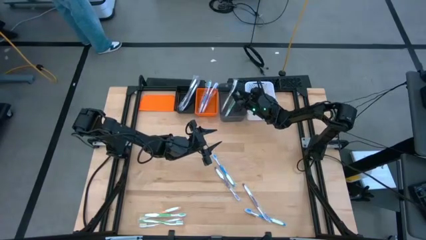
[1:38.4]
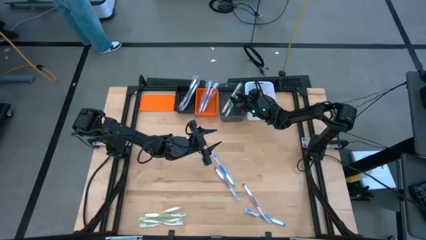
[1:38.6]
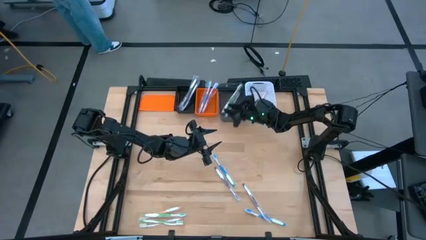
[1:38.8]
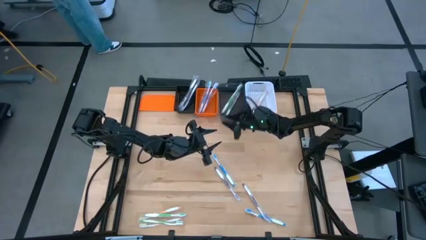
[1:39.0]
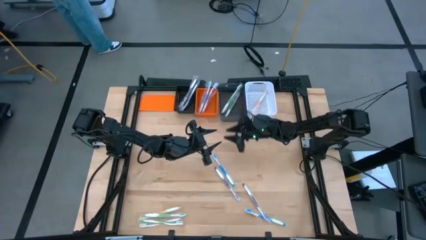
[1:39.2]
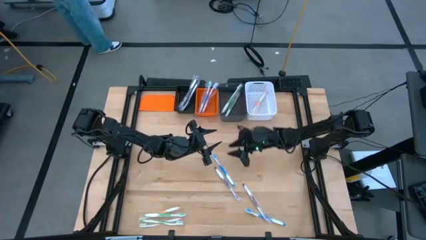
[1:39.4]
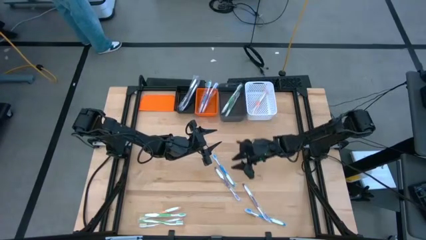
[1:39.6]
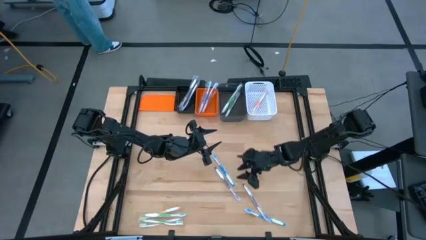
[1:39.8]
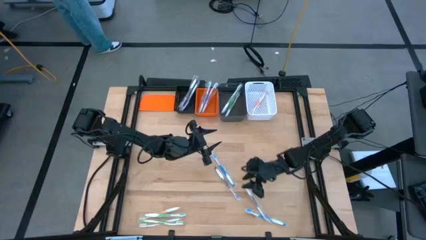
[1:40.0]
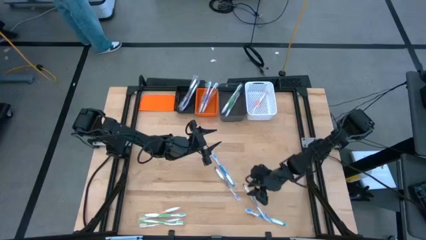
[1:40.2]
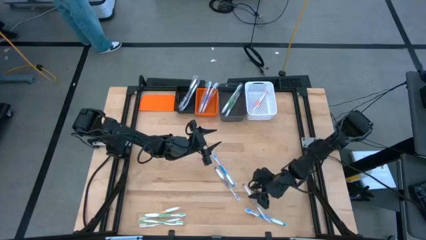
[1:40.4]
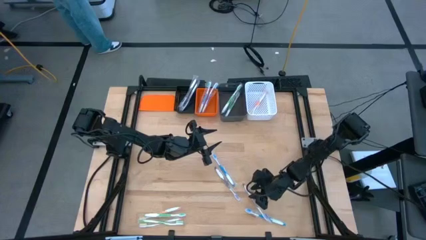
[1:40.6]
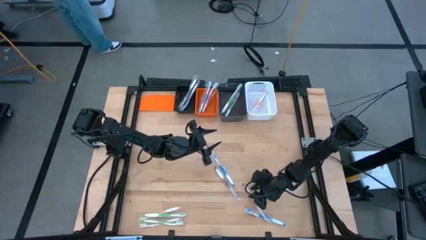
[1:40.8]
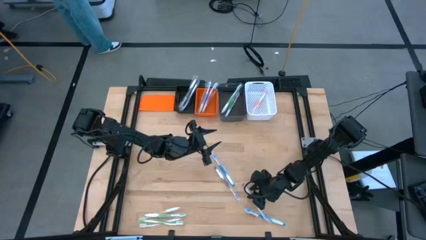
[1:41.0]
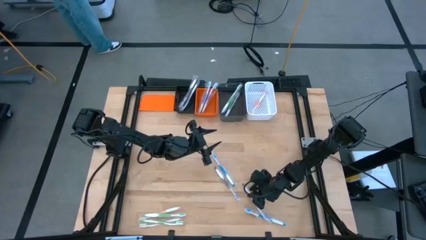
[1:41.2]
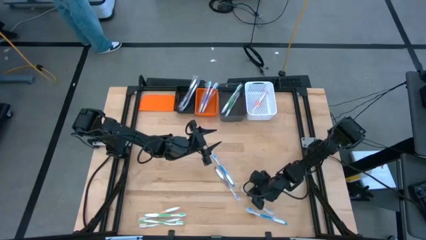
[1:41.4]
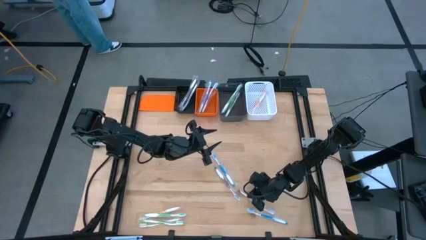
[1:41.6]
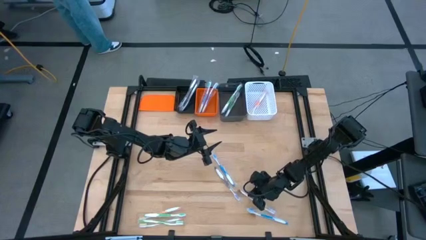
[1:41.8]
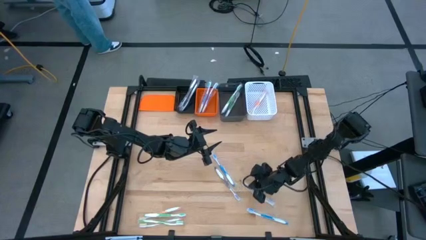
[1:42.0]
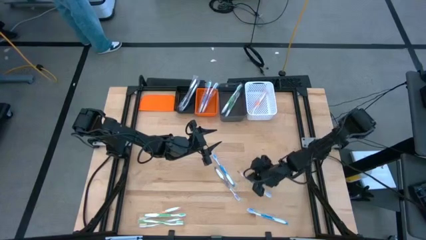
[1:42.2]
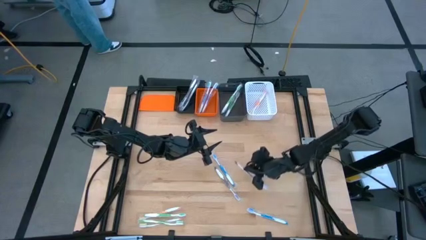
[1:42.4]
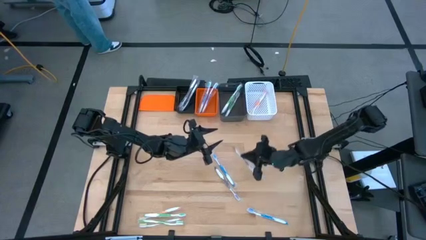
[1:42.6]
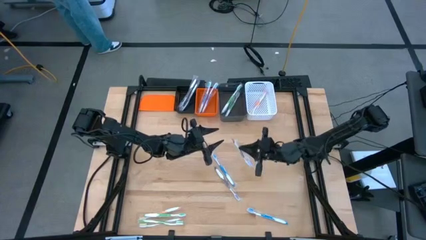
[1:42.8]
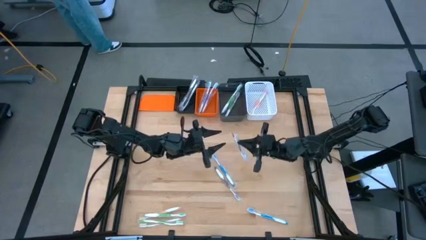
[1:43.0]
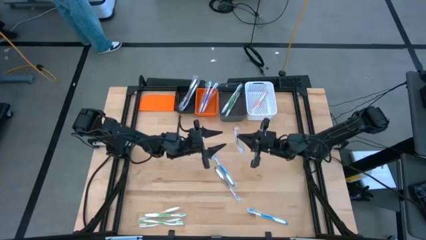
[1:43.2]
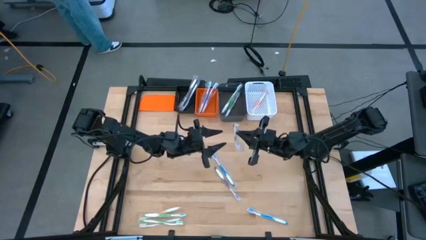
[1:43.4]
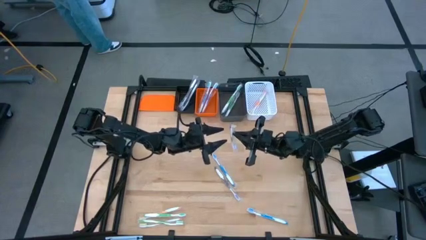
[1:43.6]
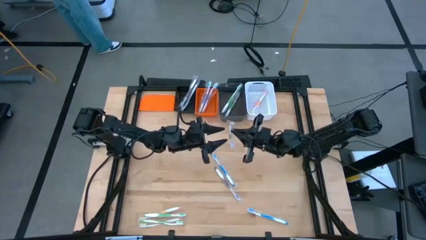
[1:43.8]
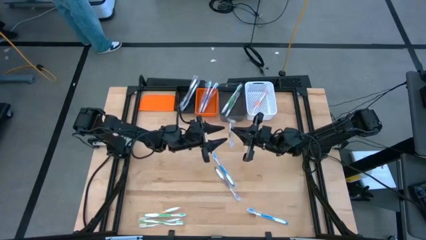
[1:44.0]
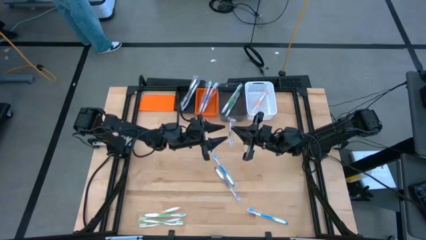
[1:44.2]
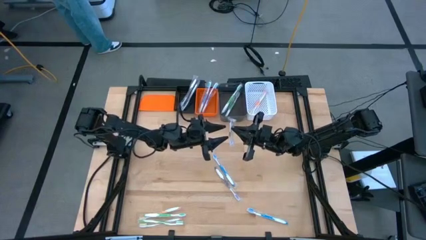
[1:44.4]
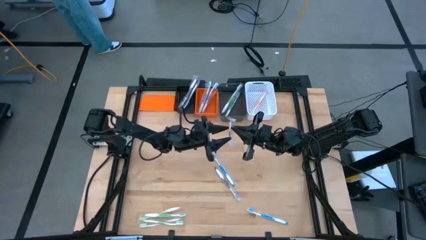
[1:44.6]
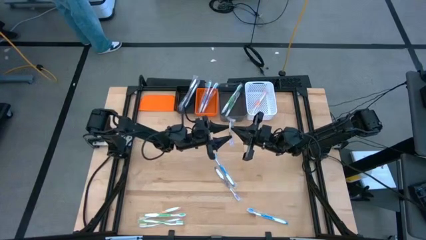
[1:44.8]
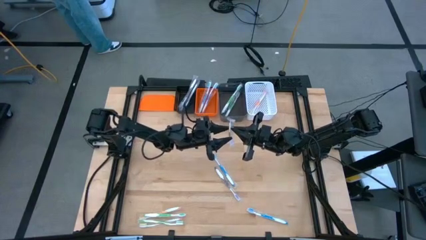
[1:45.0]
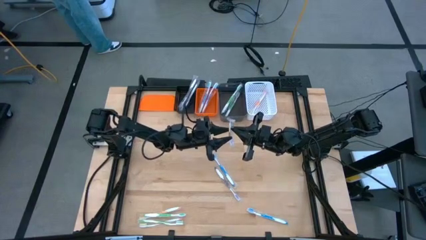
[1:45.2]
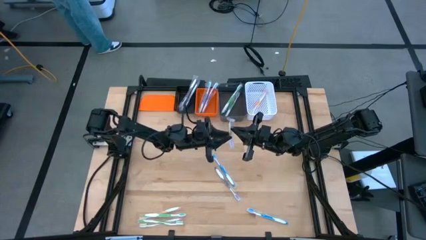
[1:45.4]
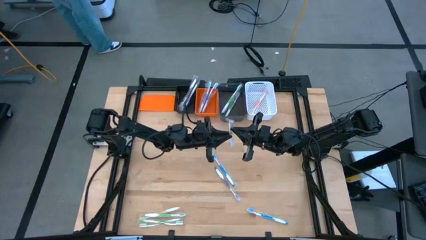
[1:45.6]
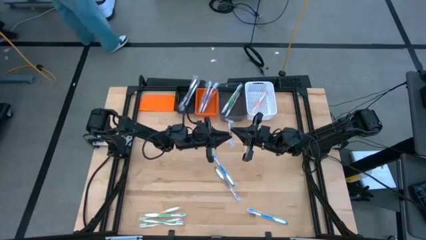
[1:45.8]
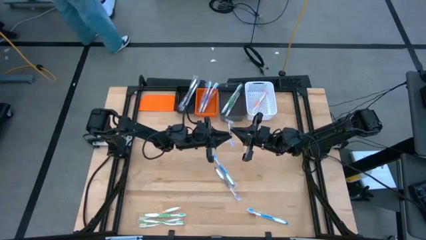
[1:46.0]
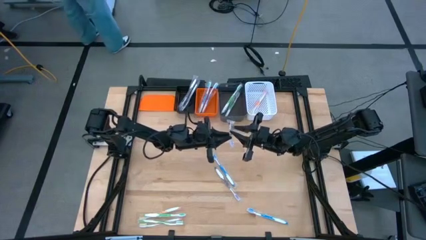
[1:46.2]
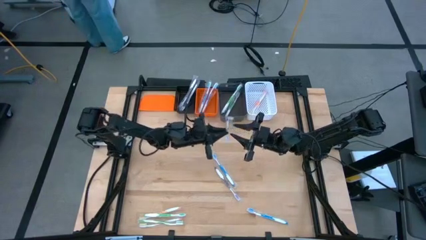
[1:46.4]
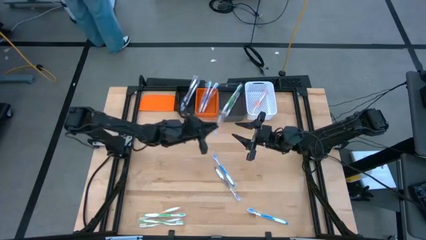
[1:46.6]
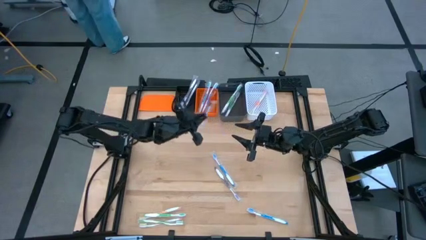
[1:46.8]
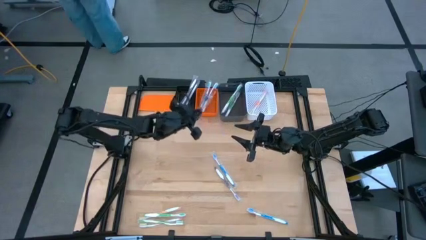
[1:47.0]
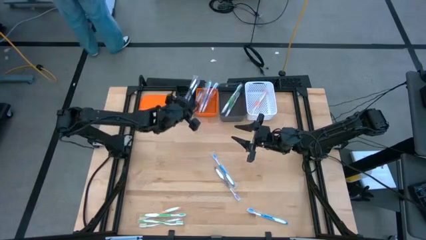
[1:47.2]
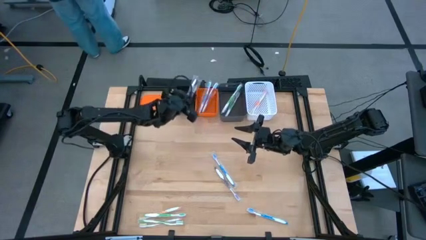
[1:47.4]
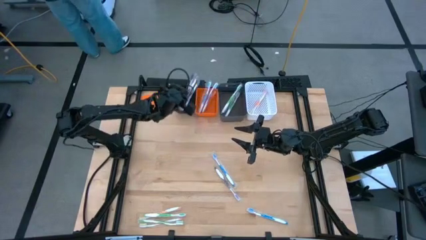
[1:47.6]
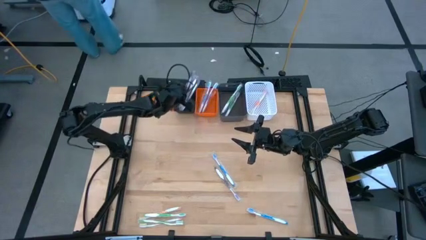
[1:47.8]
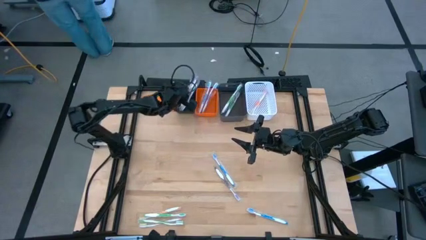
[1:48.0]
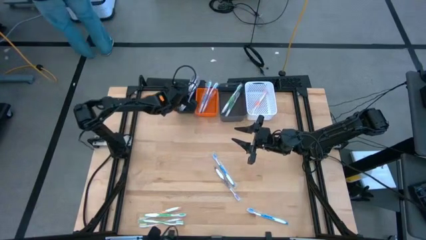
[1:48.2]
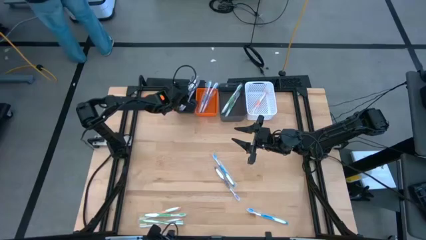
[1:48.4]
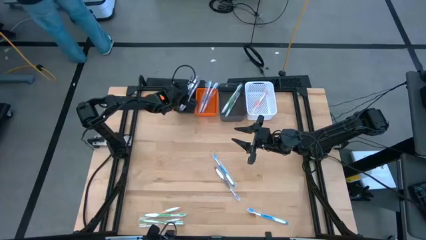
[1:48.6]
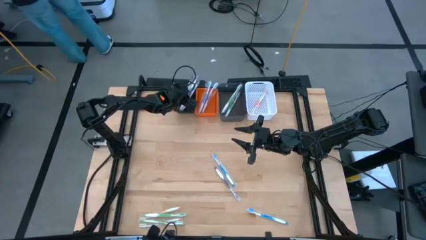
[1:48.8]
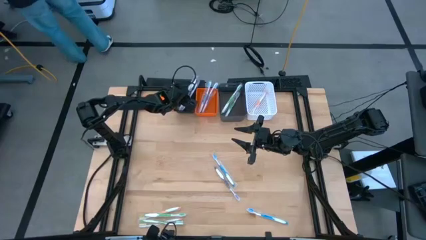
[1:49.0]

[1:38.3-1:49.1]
Task: Pick & Place Toothbrushes
Put the purple toothbrush into the black bin

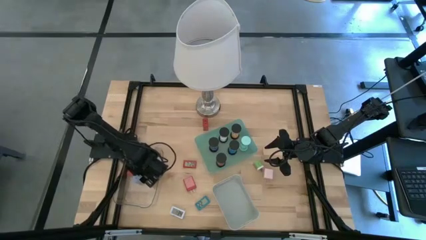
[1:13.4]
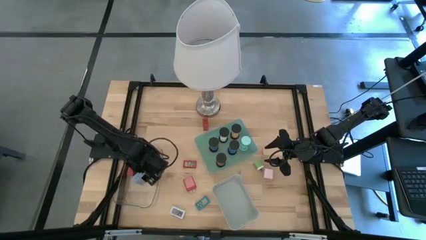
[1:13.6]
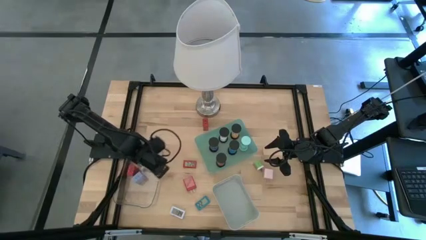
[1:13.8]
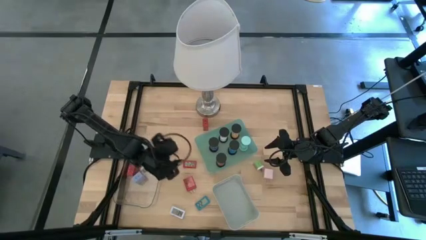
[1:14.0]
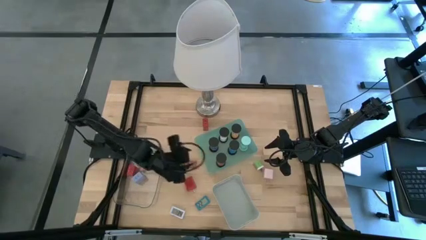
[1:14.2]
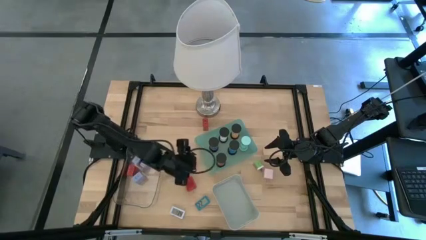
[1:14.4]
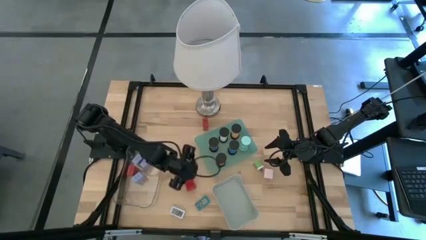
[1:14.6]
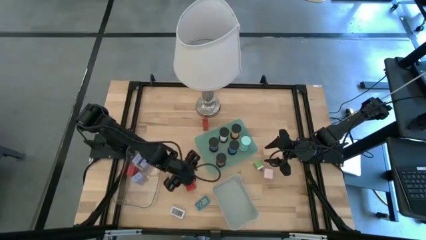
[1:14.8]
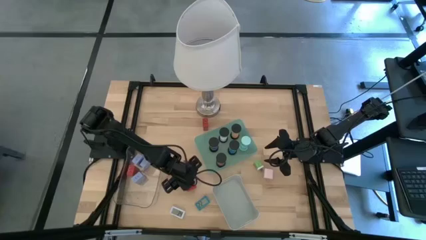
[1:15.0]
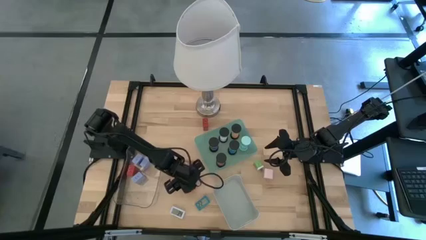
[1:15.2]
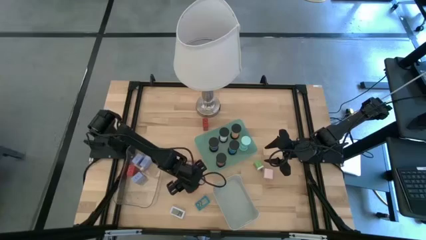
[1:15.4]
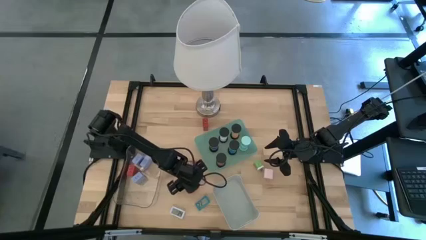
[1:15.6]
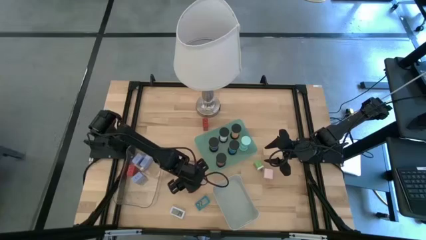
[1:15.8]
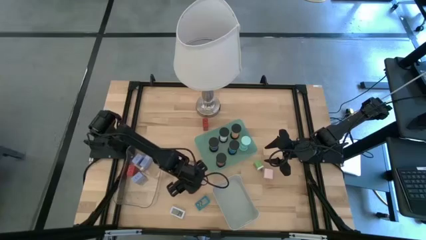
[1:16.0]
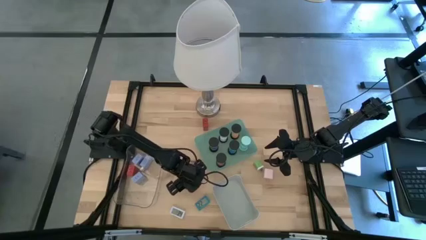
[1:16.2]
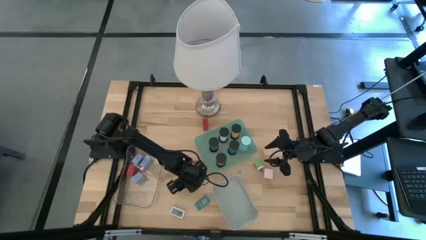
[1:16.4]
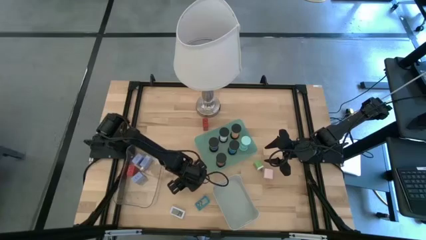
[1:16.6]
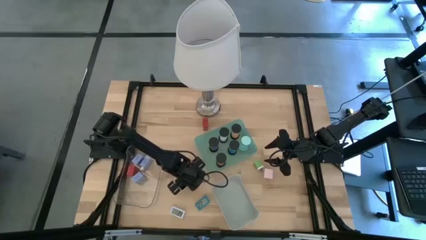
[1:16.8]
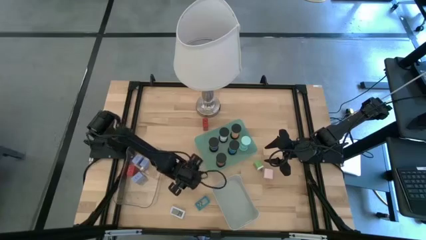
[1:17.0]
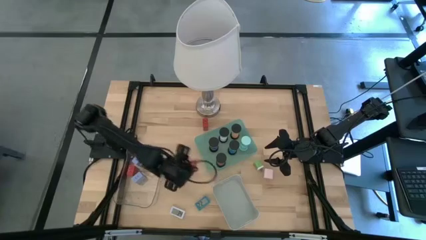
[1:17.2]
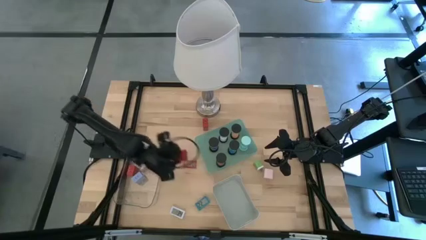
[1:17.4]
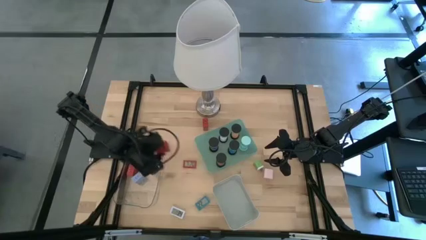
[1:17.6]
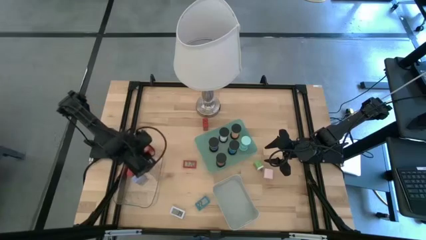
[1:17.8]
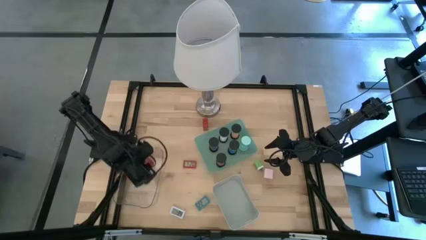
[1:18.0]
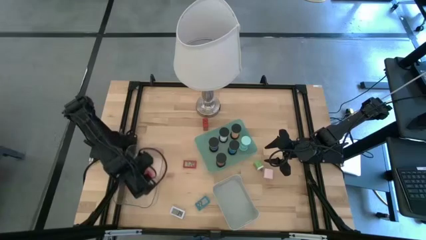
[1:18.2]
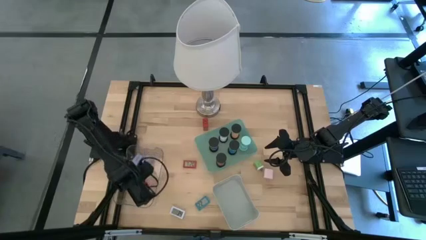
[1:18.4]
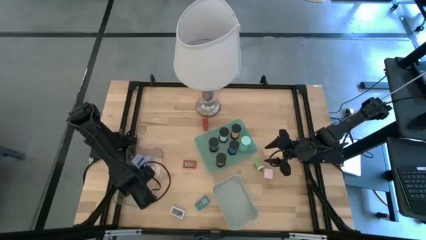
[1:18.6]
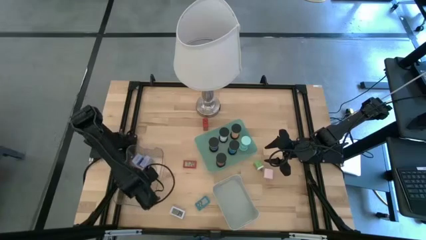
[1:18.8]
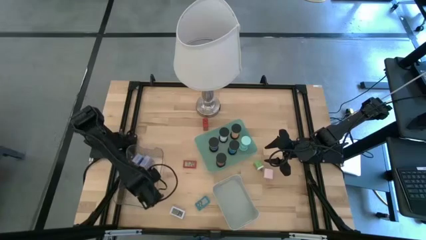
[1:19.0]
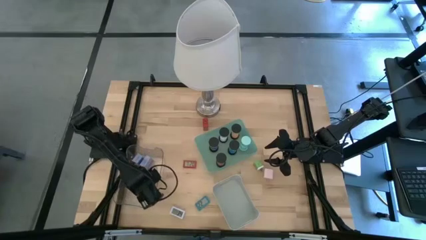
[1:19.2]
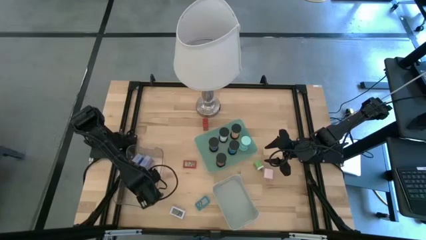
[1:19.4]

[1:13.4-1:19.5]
Task: Pick & Place Office items
Put the bottom red charger adapter into the transparent bin
